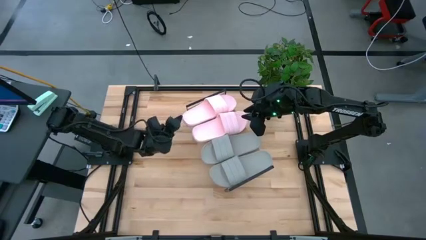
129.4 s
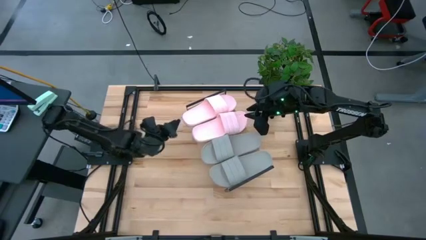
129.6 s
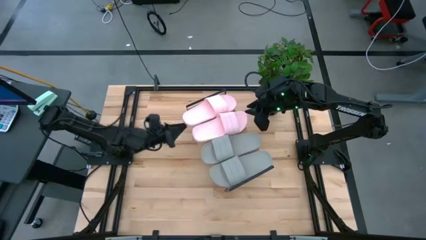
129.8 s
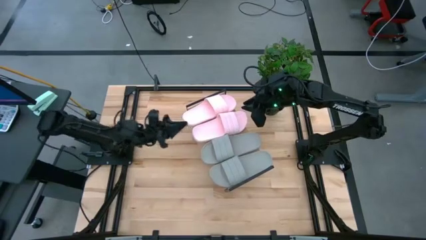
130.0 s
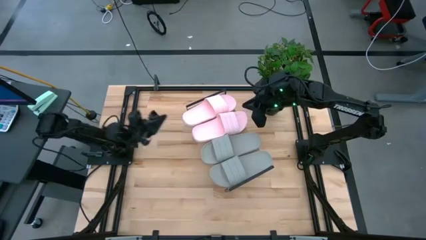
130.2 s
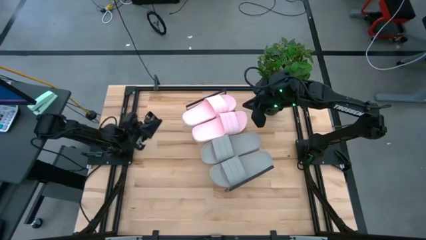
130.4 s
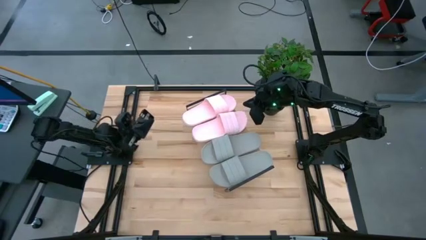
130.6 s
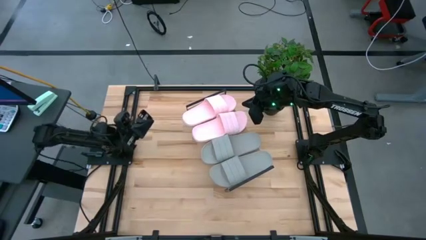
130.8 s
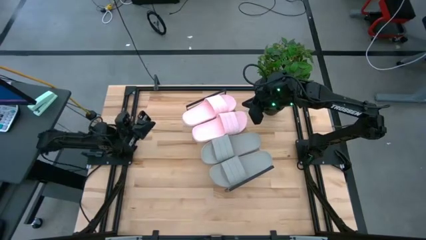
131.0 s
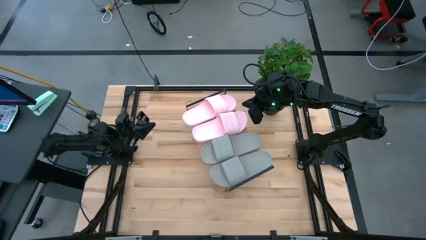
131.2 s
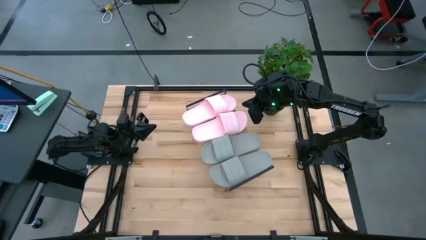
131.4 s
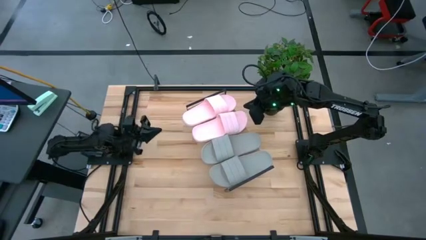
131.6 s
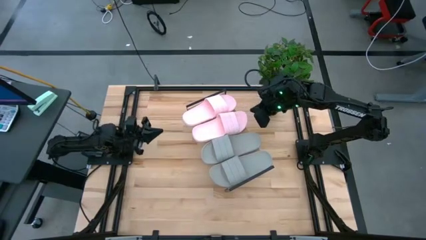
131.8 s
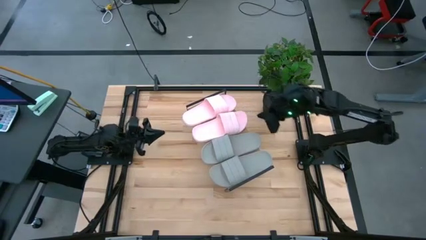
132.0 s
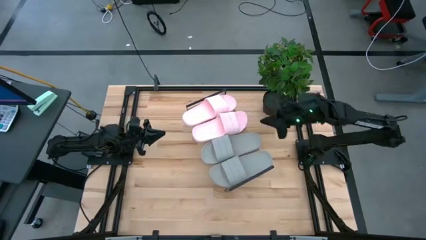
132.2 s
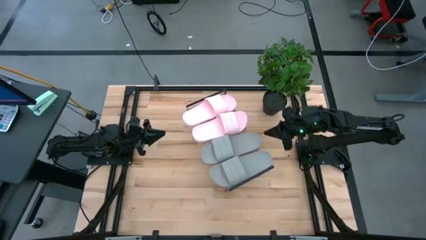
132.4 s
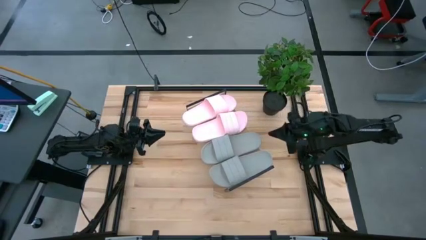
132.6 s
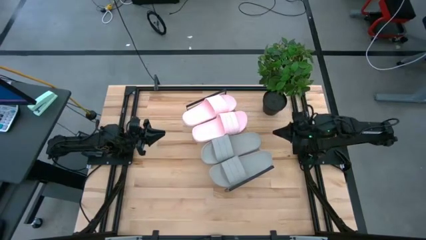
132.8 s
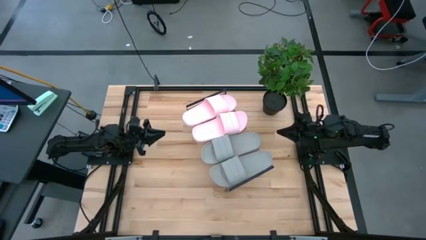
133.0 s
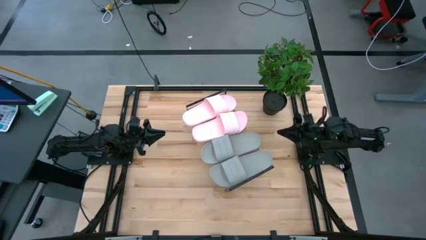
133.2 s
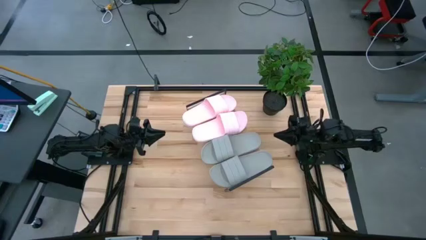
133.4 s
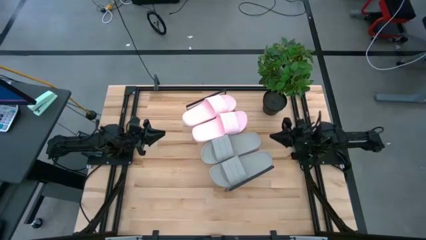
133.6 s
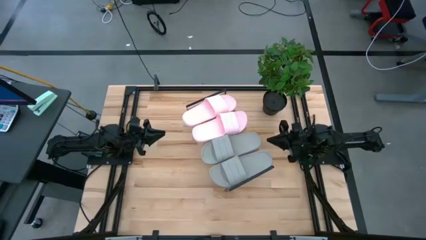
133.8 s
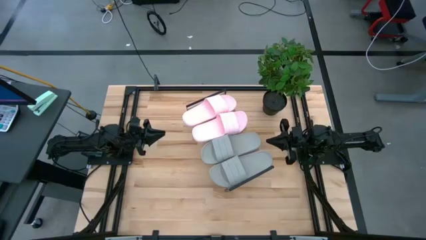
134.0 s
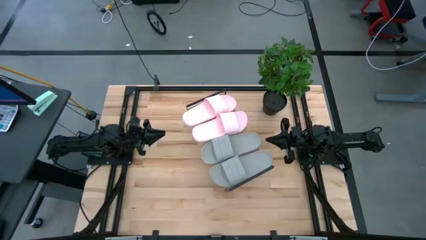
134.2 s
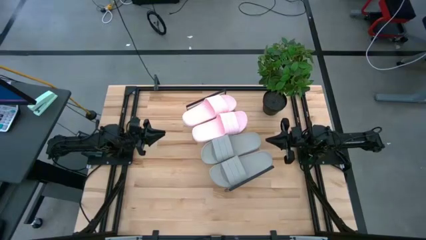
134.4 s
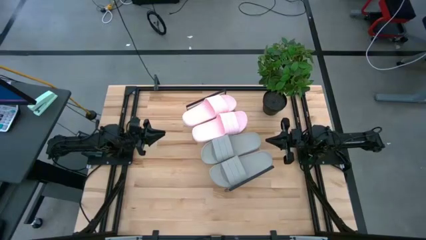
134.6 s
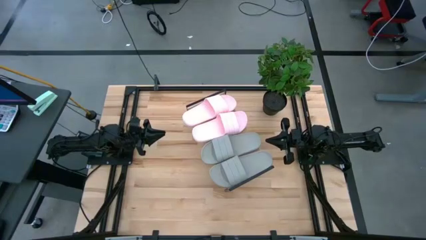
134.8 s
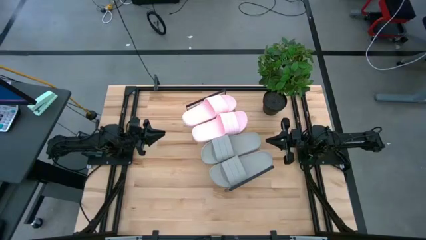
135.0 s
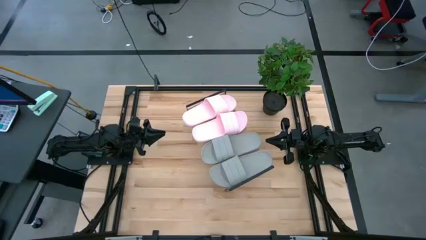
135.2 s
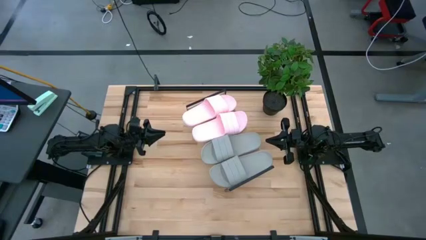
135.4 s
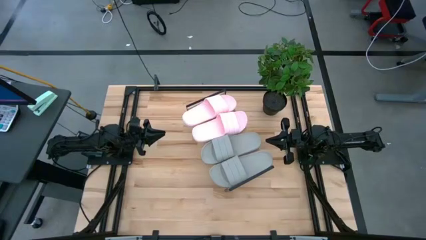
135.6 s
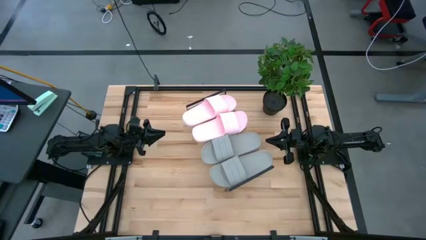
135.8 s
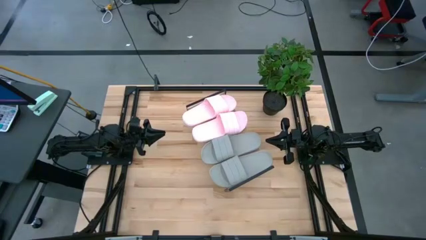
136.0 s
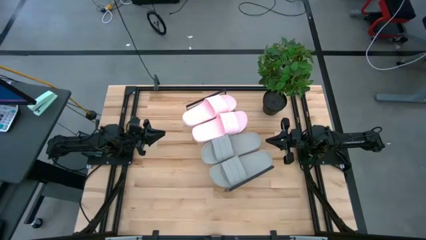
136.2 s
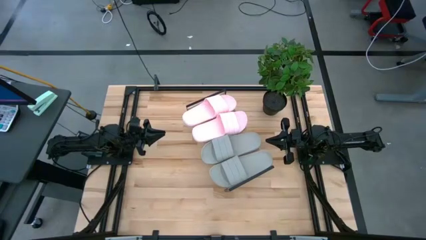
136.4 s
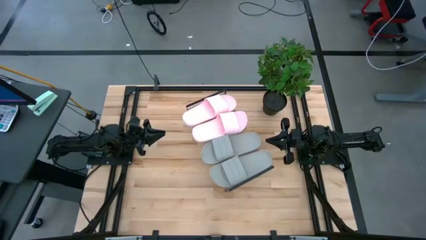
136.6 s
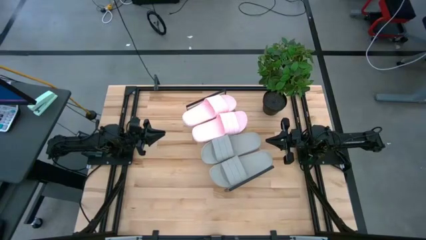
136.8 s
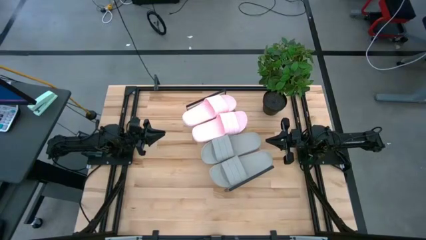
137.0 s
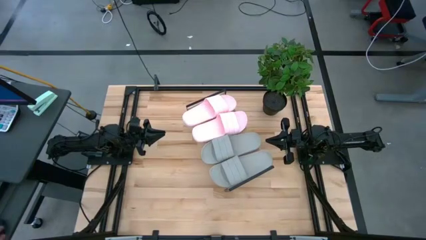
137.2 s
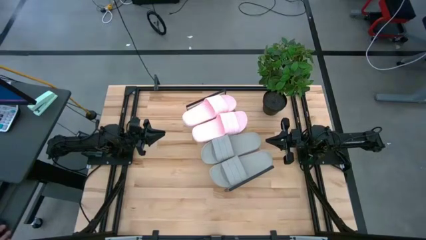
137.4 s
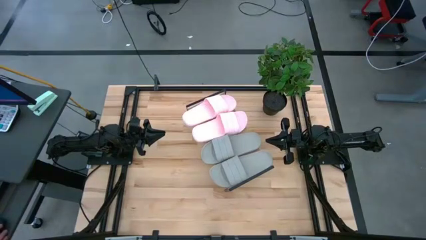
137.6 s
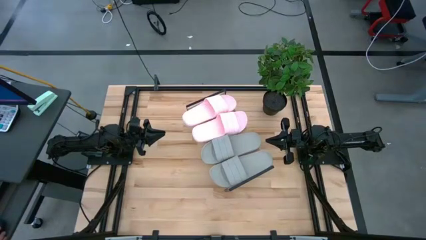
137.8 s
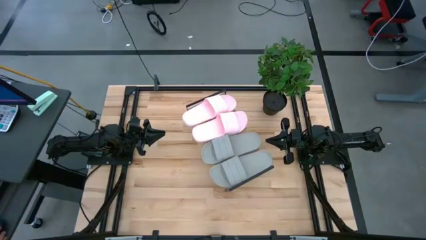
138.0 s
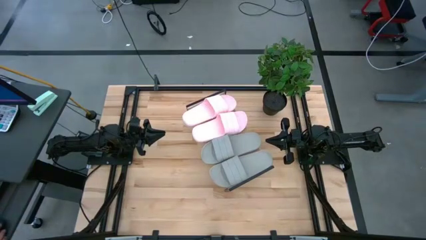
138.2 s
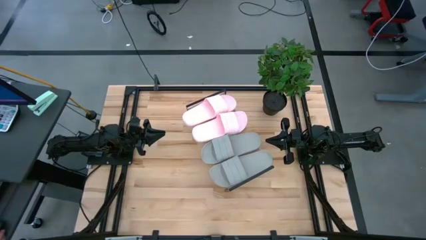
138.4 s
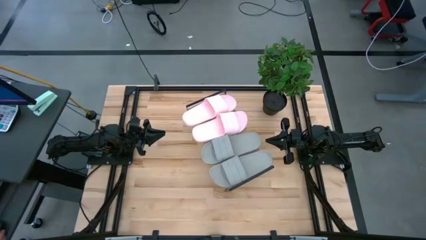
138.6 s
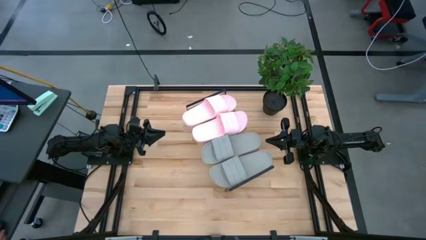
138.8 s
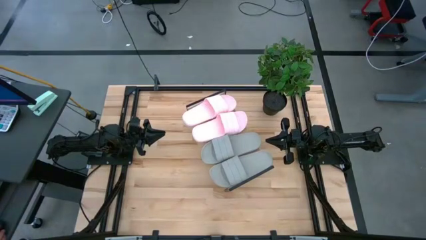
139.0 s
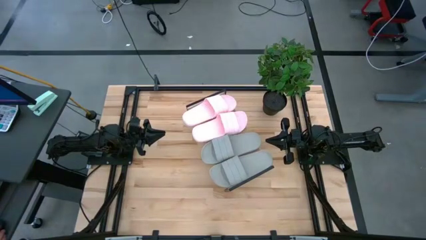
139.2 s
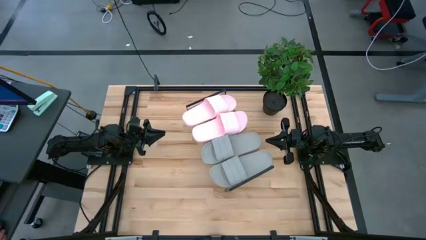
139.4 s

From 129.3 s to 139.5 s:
Task: Pick and place slides into the shelf
Return to Home Position

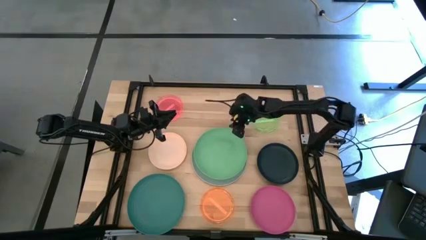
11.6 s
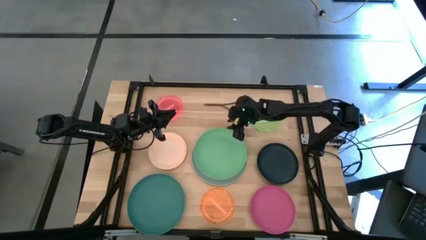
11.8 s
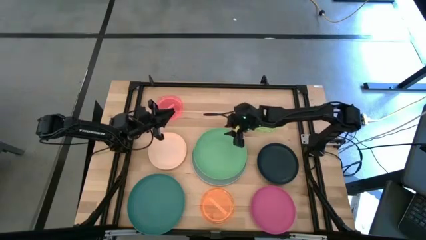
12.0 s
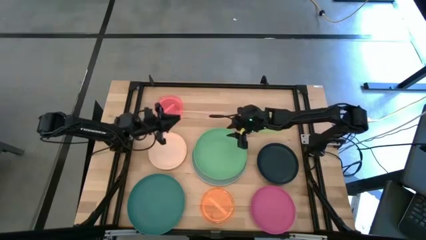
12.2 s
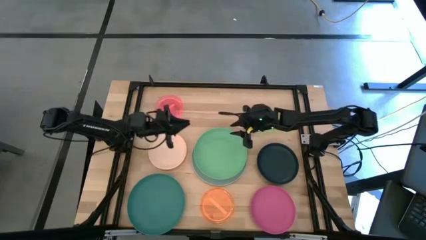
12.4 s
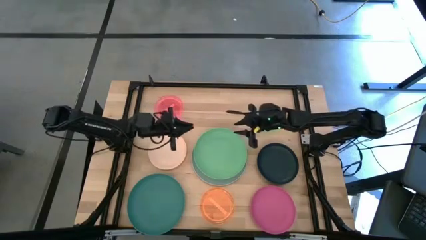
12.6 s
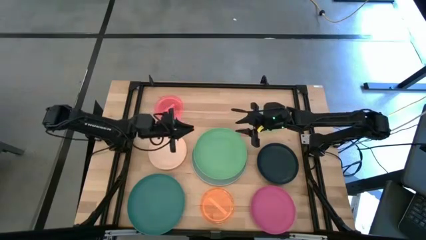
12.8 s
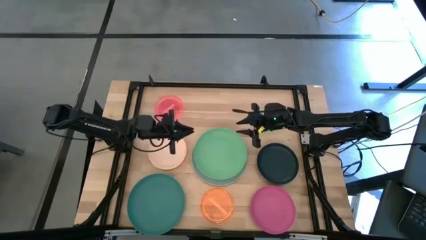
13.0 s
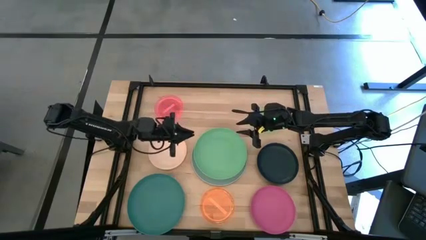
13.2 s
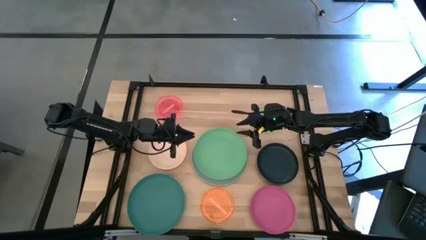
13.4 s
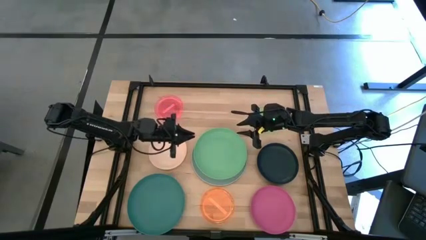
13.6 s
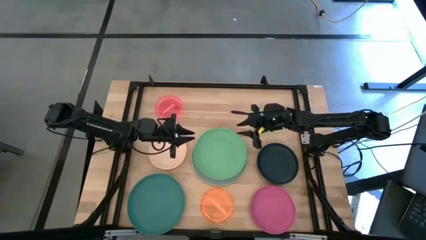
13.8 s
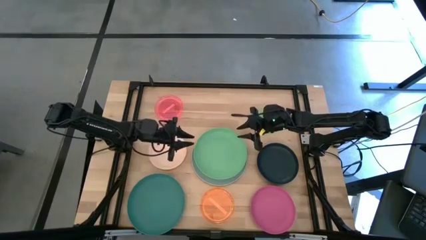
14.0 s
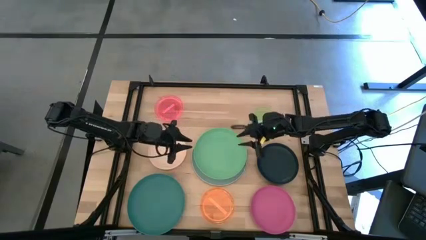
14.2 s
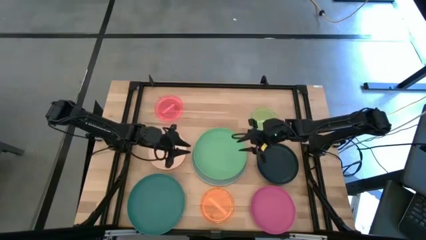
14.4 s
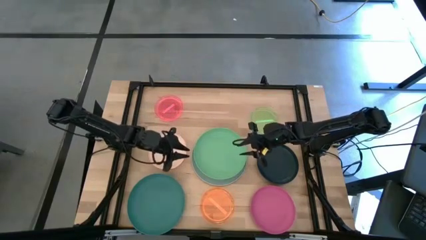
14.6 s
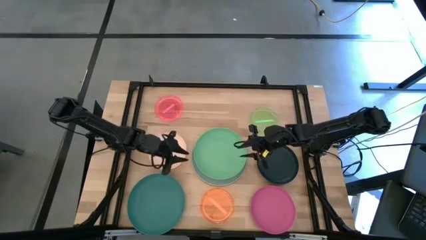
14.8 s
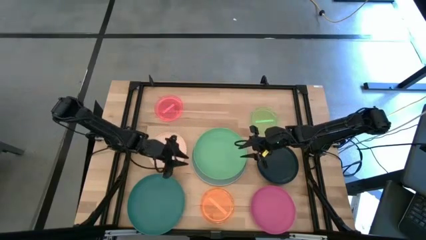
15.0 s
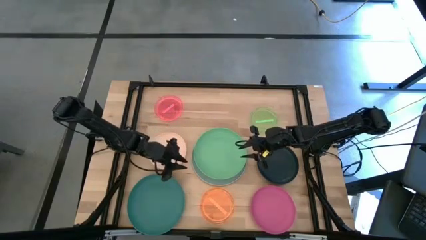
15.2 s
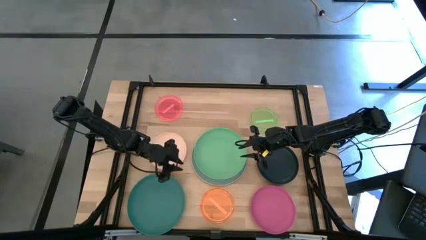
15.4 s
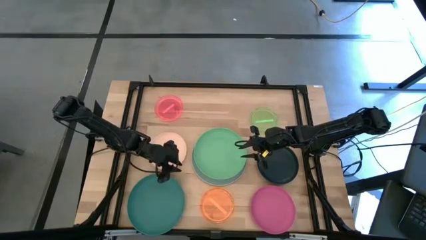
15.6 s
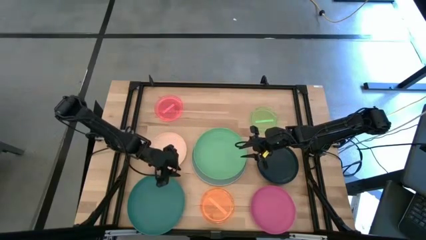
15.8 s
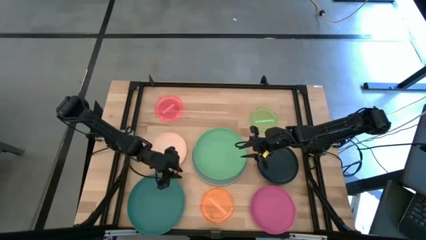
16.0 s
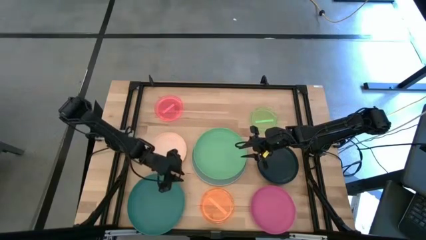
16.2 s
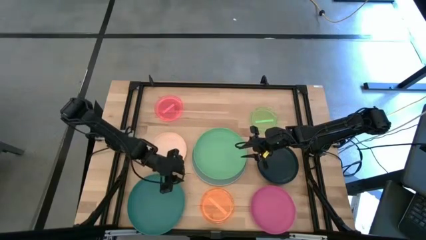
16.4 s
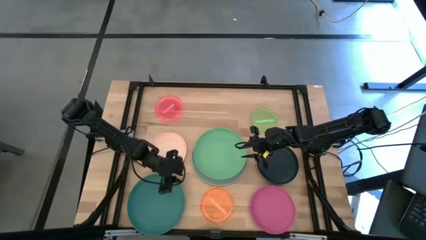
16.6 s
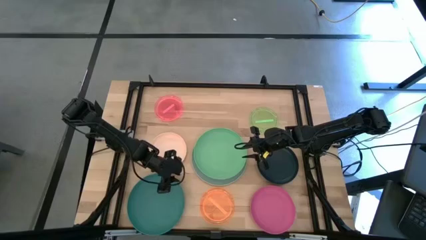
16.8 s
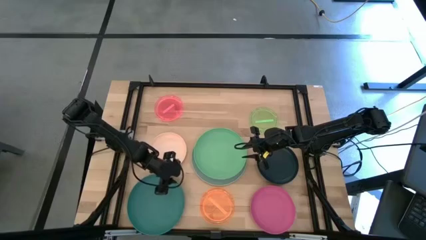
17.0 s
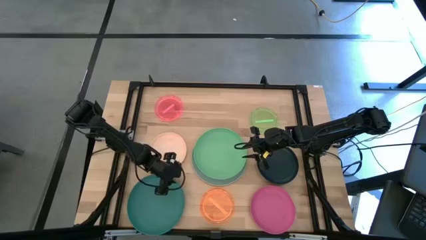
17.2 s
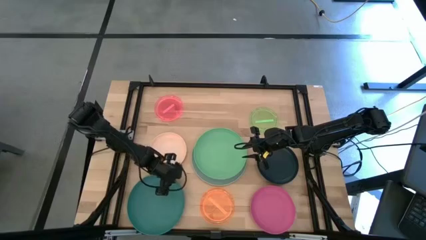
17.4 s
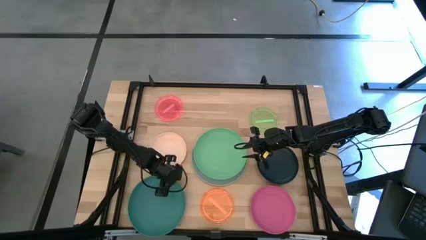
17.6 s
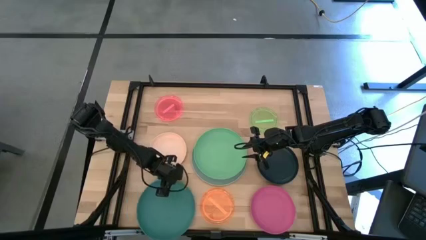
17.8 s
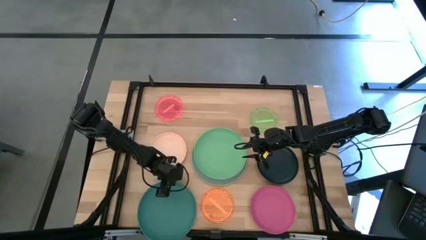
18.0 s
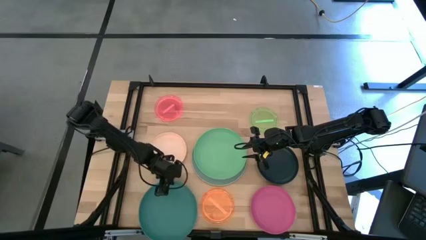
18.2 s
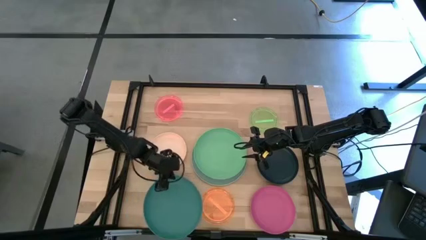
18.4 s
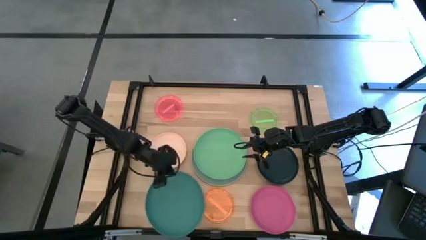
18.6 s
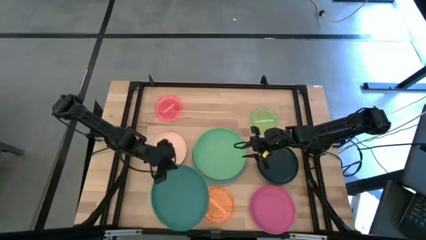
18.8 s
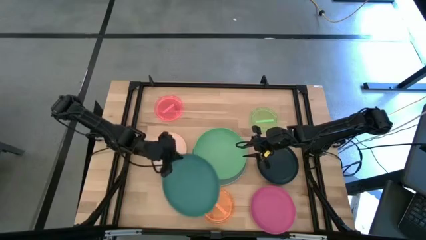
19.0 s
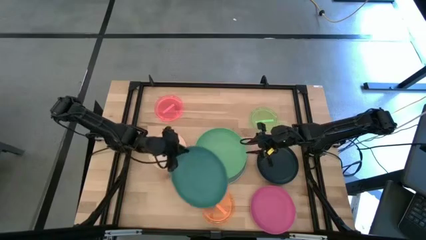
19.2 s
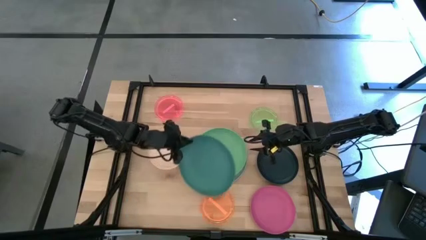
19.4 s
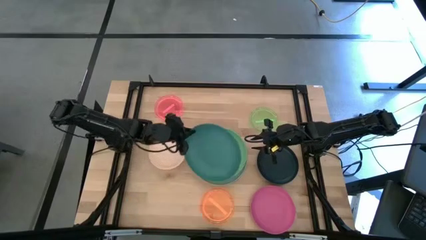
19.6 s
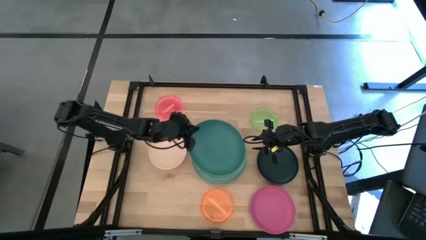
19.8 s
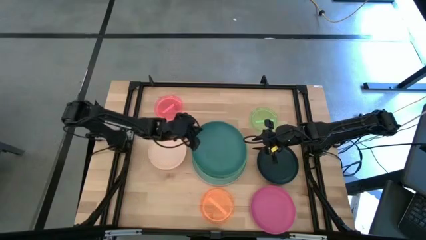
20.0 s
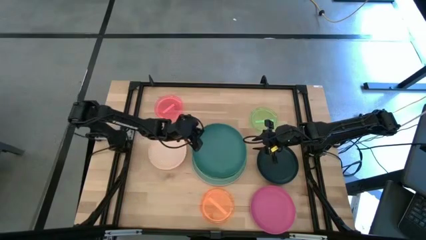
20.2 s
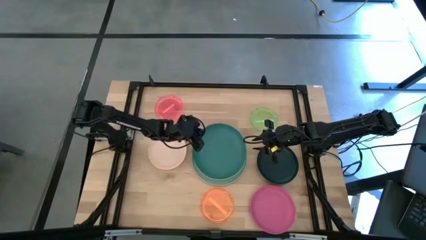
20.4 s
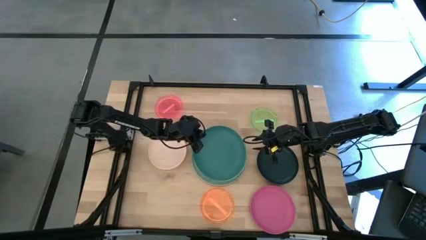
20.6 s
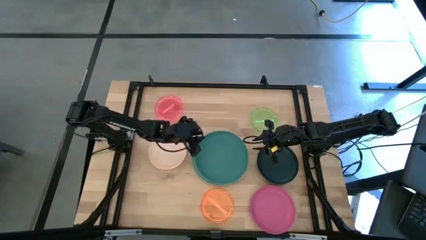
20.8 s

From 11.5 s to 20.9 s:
Task: Stack plastic plates
Stack the dark green plate on top of the green plate
